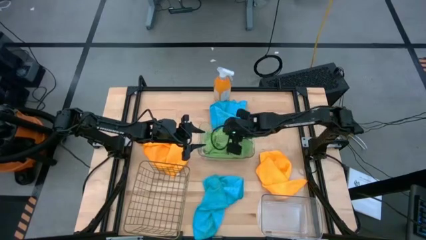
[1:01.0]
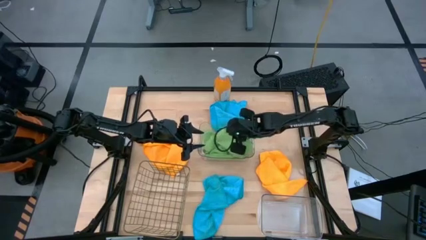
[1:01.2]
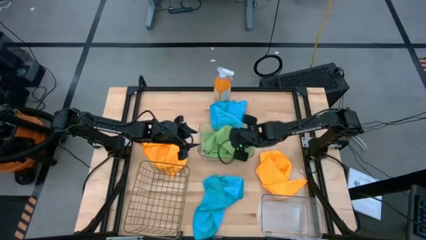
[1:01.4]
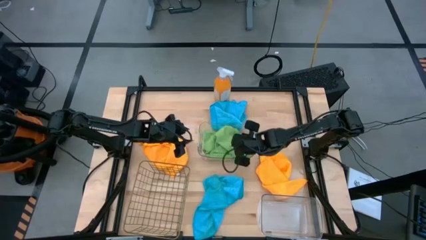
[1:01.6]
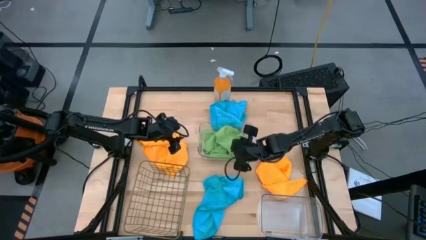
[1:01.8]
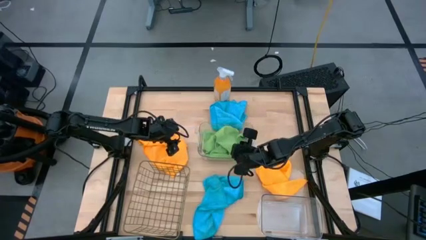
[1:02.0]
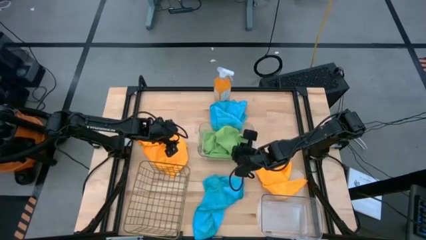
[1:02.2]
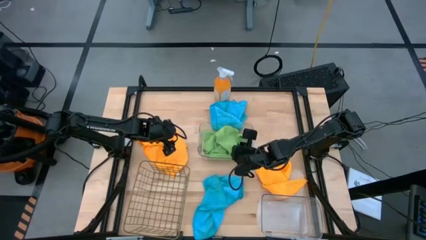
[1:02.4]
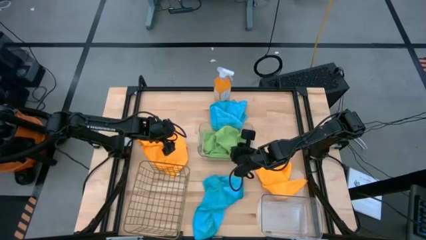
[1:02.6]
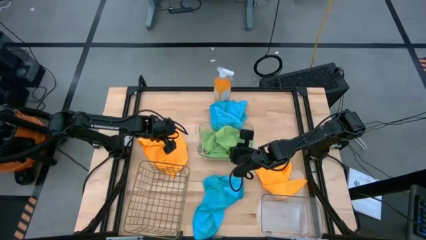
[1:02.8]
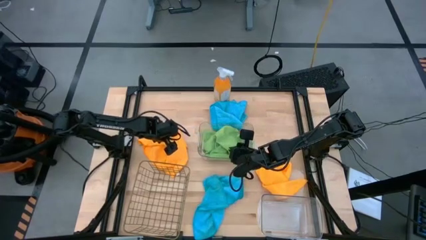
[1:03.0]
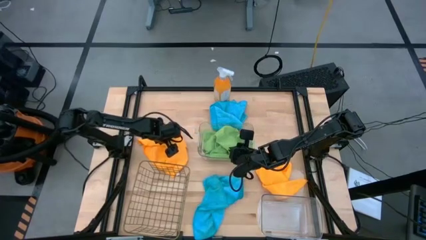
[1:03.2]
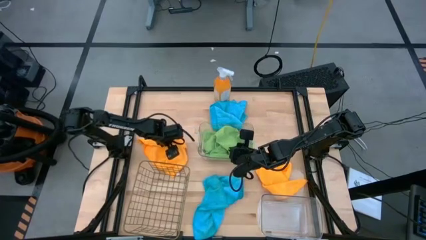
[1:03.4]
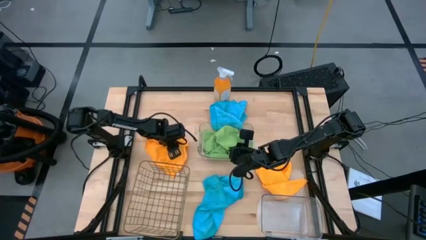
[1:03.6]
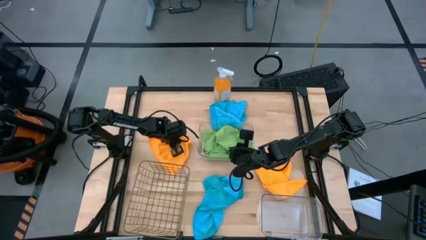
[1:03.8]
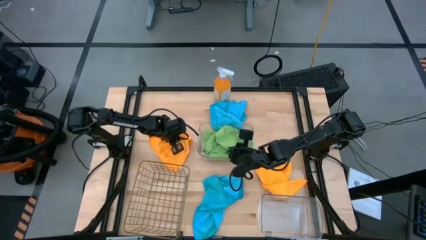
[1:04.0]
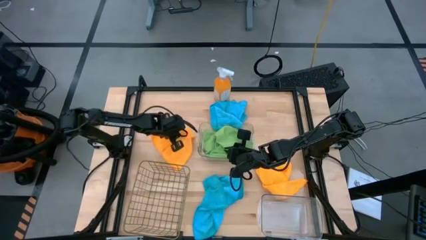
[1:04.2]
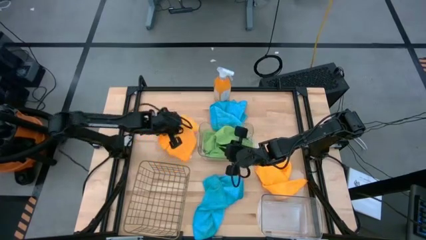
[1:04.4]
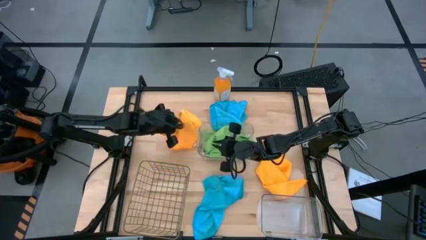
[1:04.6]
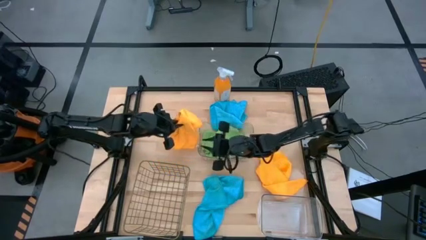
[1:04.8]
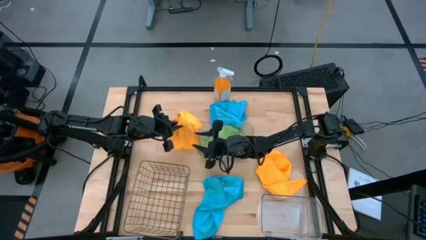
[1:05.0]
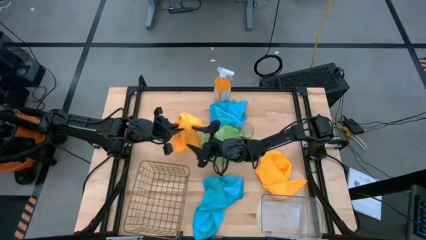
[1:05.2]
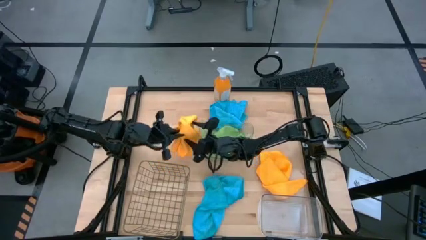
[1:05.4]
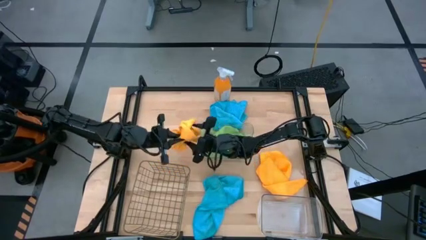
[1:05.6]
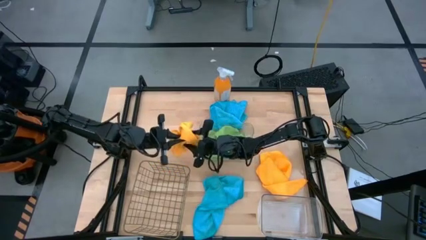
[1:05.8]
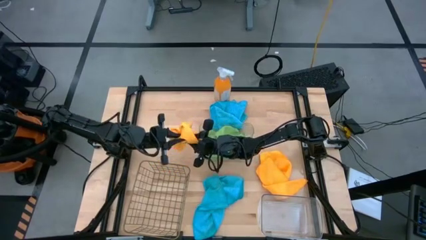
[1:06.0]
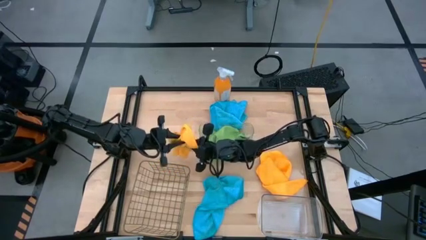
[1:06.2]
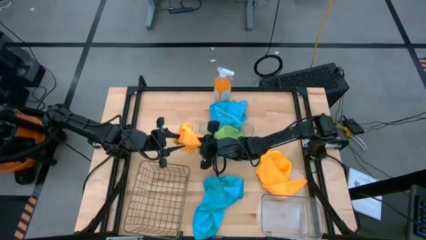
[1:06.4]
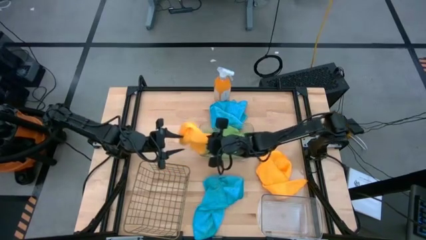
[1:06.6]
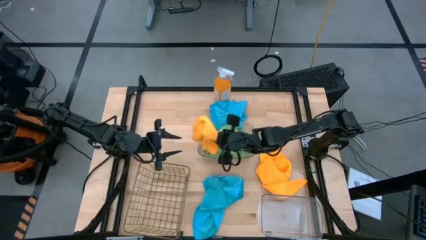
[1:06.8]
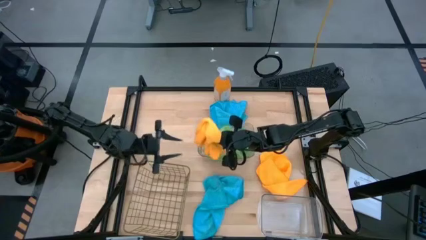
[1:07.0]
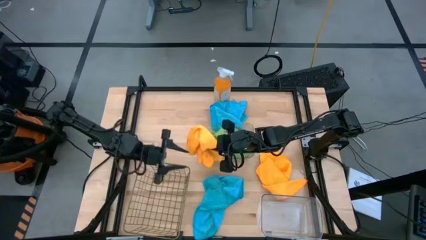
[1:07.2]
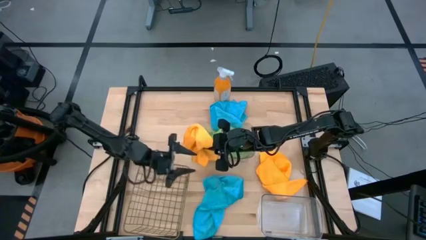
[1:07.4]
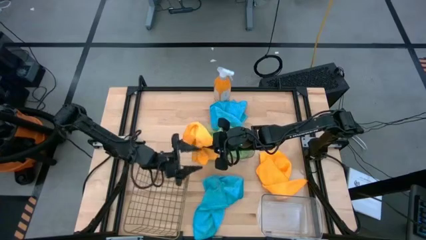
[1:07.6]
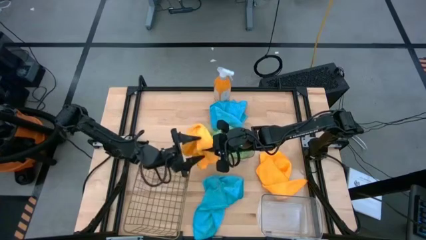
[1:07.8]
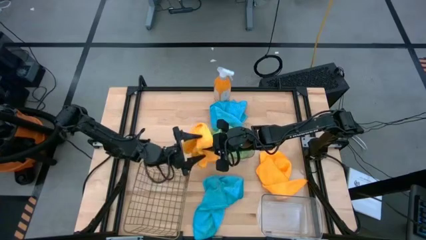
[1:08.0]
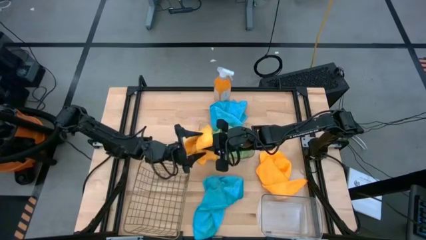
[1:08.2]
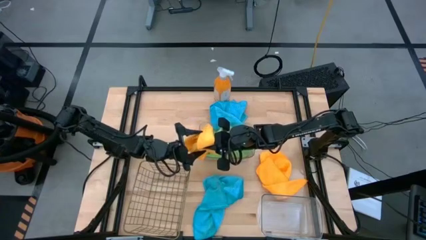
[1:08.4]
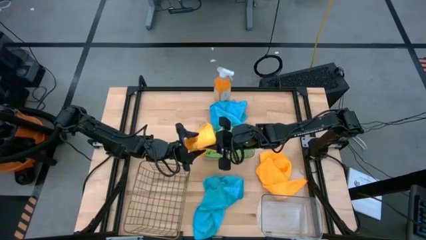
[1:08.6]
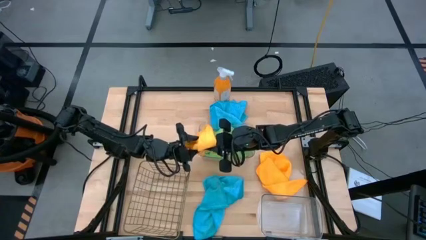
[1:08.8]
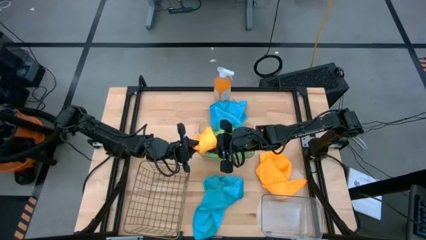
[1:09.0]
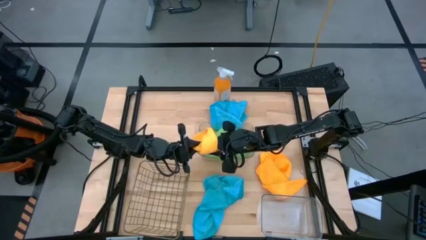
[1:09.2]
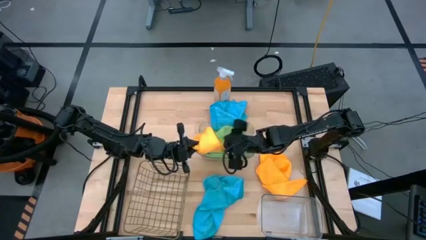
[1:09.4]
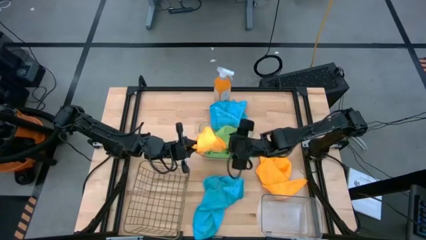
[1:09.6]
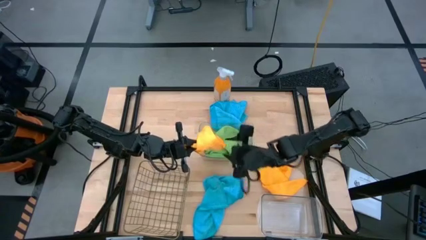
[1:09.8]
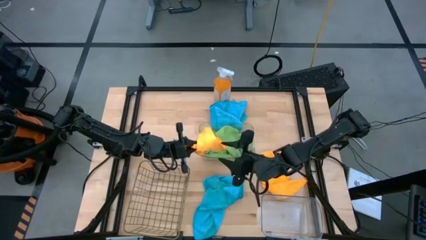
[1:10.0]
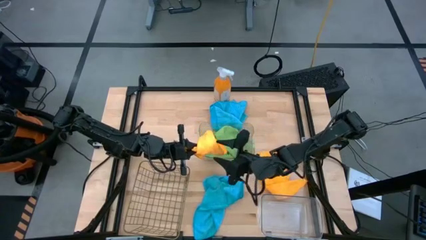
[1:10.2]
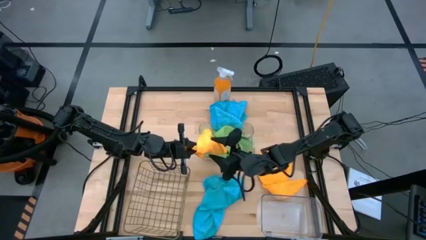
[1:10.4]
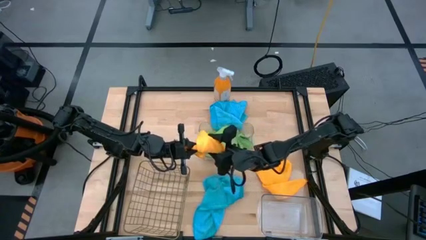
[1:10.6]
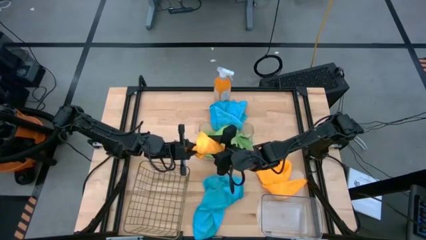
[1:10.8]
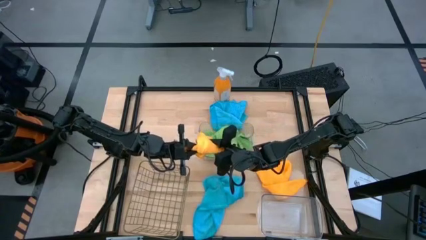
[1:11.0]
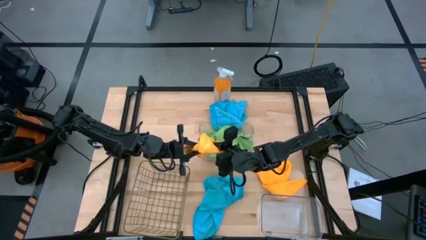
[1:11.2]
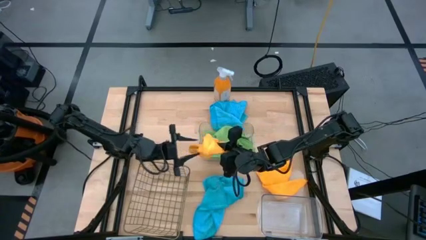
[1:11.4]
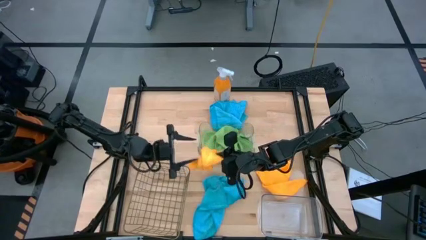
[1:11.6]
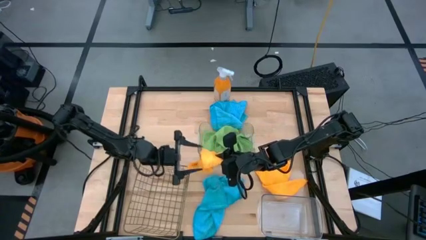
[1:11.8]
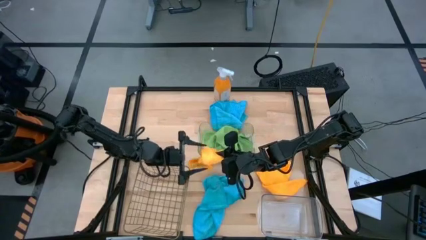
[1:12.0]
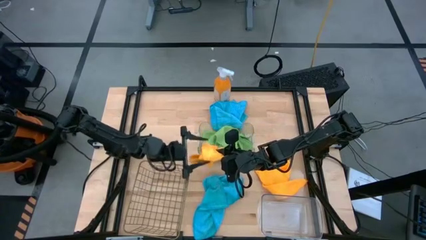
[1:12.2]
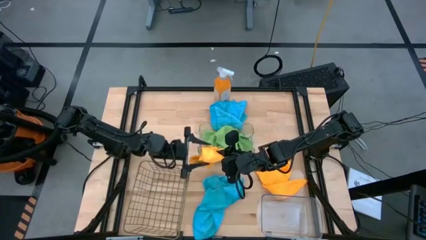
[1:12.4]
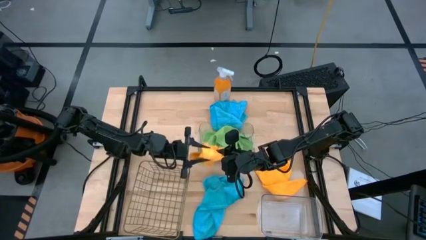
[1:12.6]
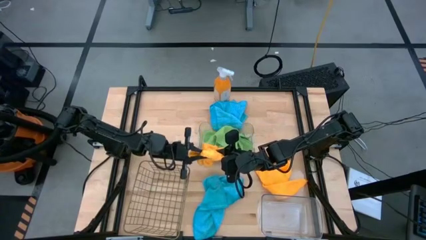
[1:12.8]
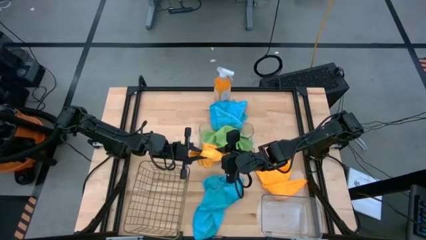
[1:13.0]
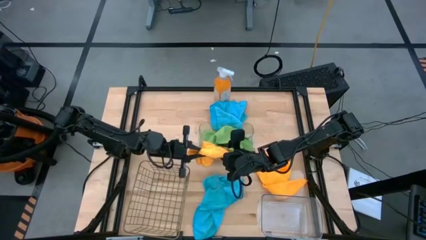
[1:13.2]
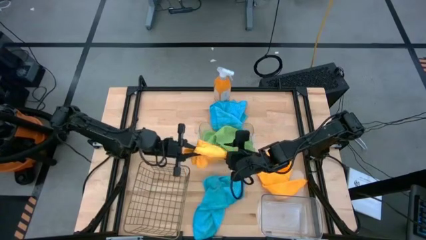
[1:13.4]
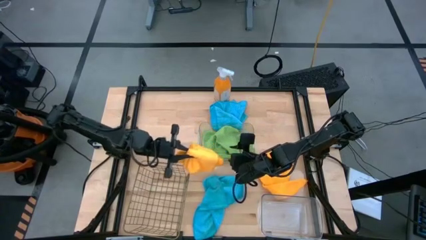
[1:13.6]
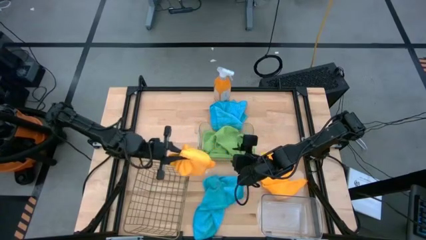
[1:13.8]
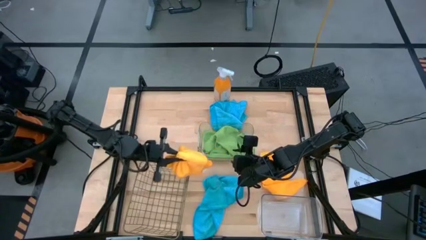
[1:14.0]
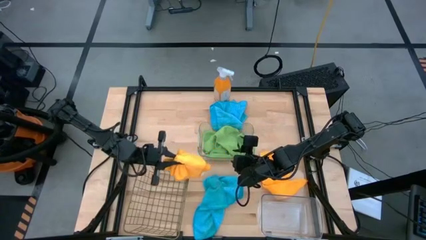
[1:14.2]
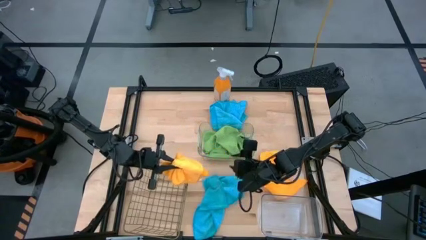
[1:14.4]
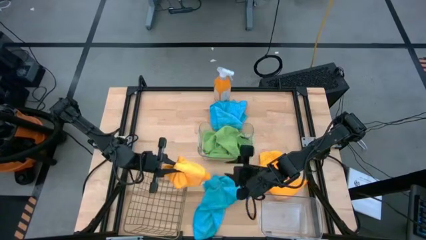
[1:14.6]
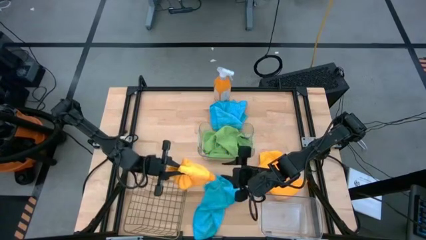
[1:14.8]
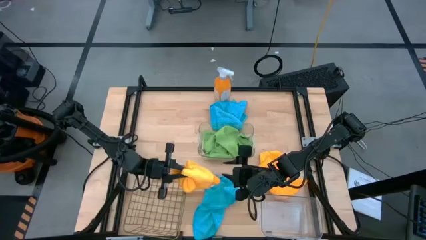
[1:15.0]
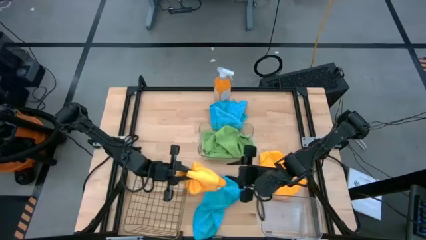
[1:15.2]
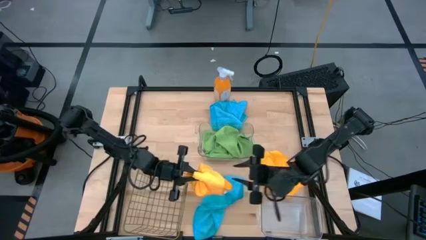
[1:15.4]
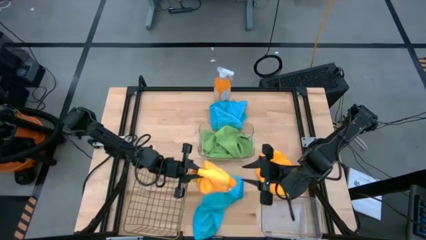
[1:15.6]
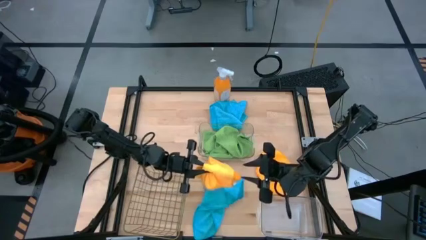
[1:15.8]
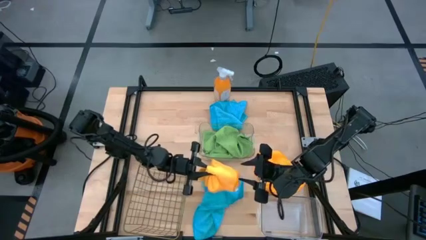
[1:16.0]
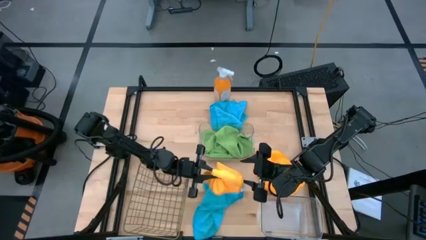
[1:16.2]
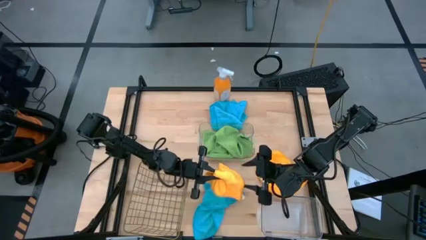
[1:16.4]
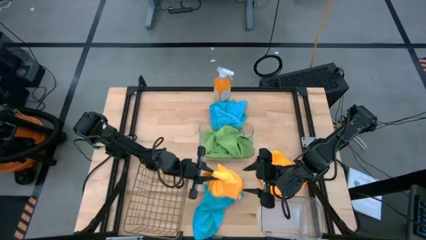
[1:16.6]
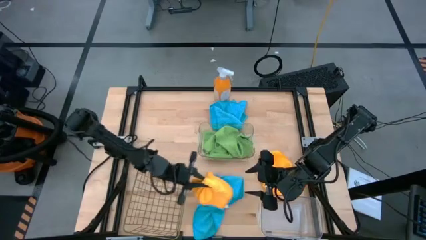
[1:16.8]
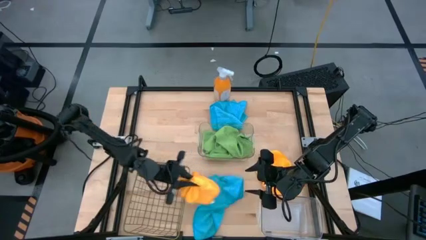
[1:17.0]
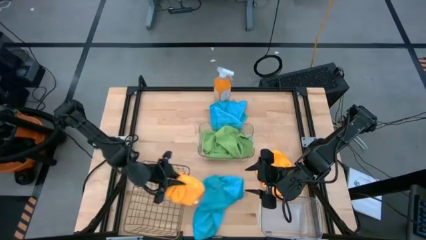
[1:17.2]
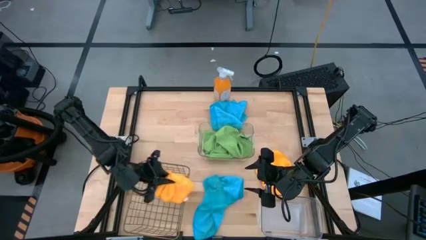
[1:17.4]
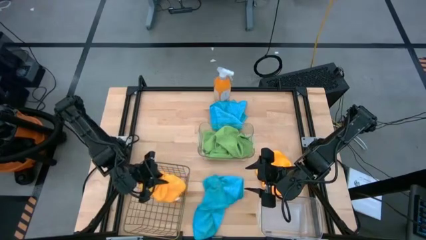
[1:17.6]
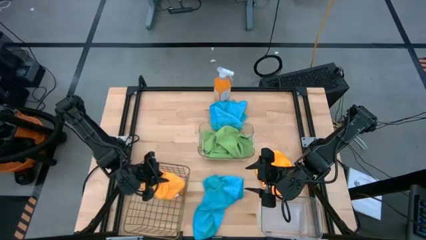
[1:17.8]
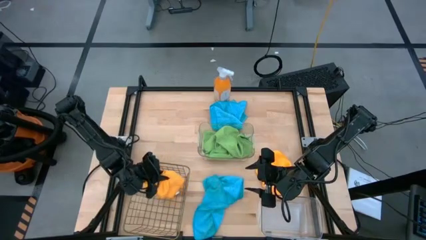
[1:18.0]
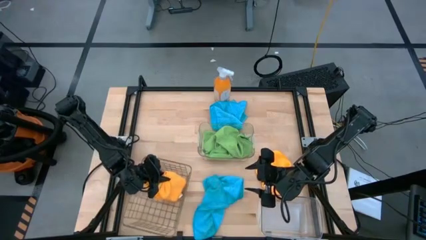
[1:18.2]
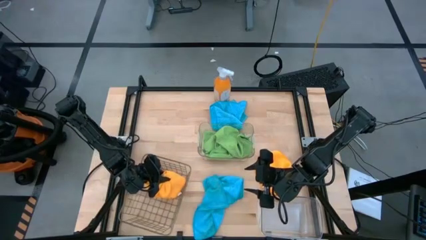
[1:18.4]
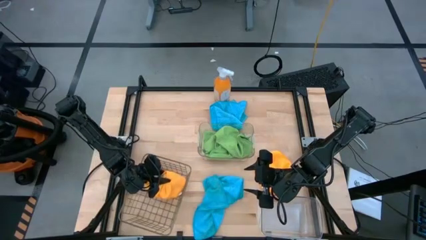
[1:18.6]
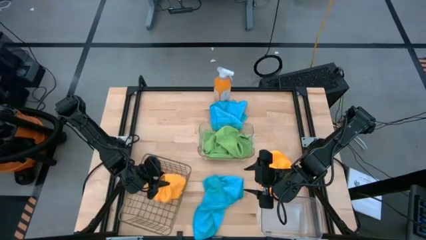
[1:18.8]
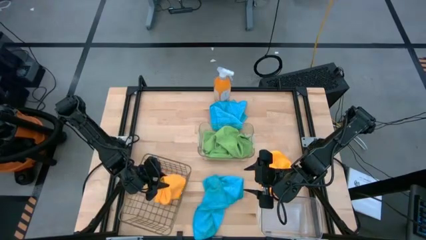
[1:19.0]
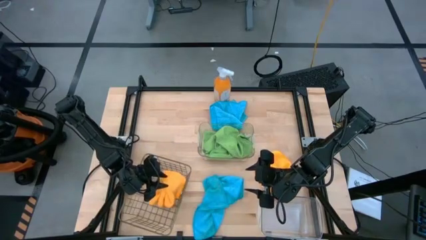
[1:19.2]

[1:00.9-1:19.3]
Task: Sort microfiber towel by color & place in baskets
Put the left yellow towel into the mesh basket
